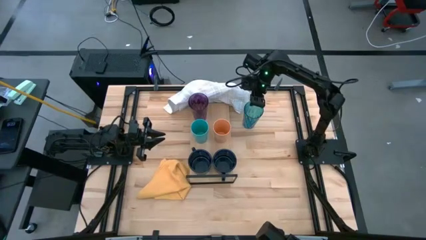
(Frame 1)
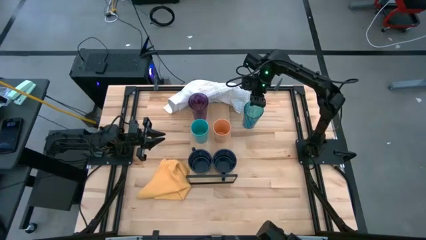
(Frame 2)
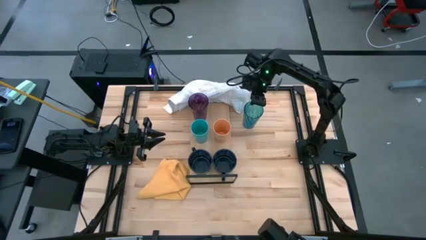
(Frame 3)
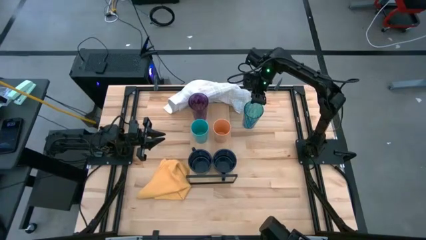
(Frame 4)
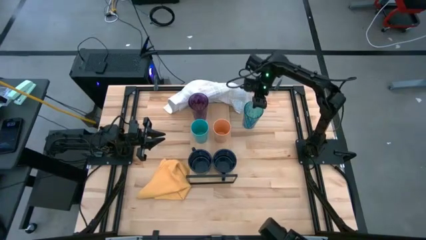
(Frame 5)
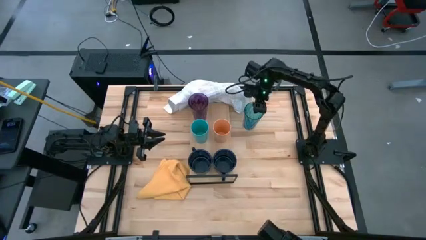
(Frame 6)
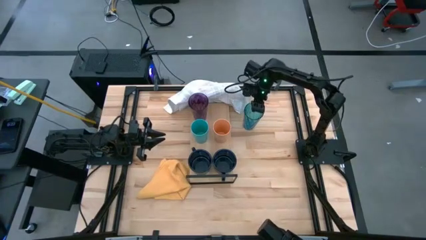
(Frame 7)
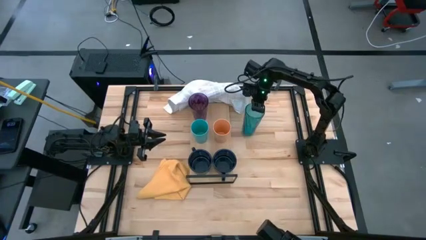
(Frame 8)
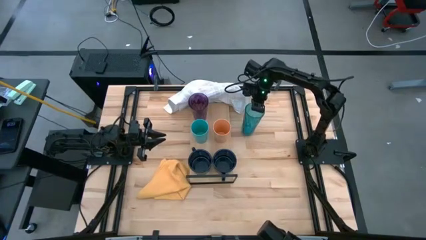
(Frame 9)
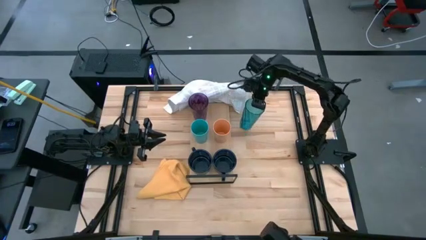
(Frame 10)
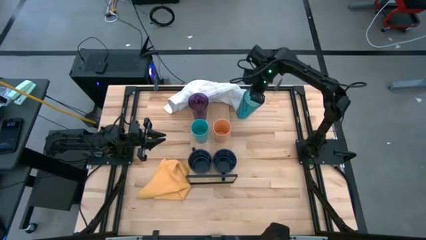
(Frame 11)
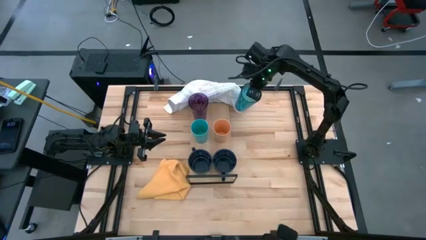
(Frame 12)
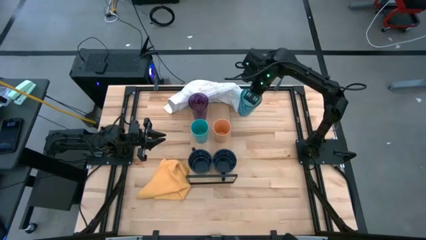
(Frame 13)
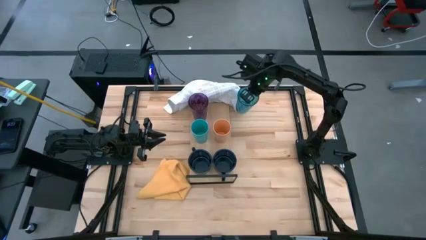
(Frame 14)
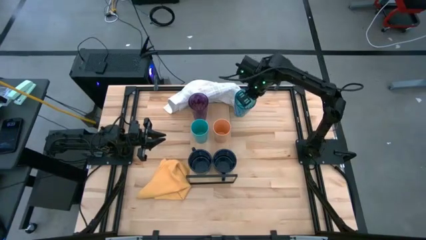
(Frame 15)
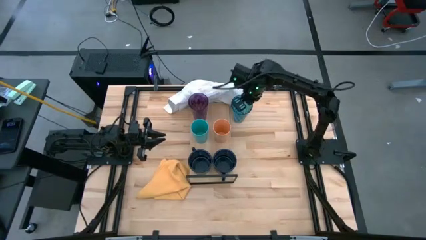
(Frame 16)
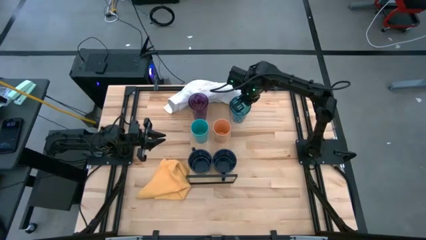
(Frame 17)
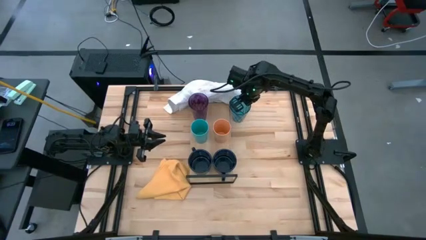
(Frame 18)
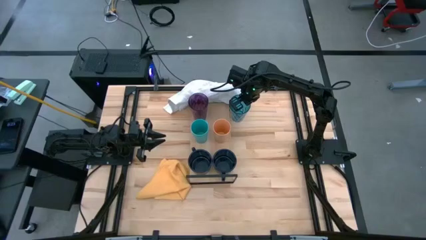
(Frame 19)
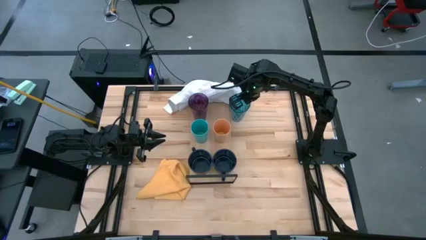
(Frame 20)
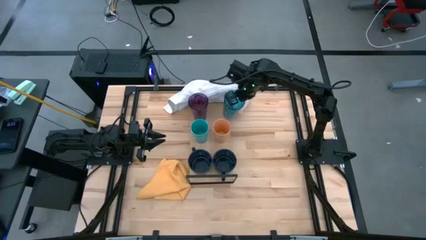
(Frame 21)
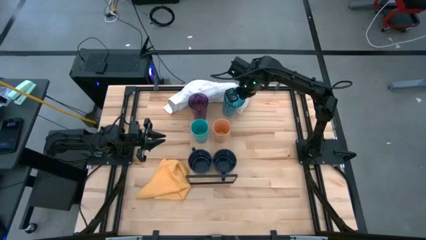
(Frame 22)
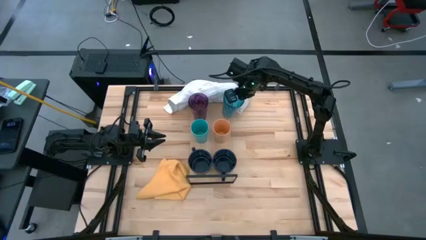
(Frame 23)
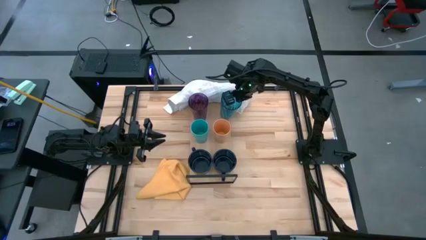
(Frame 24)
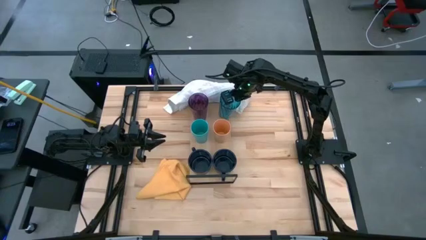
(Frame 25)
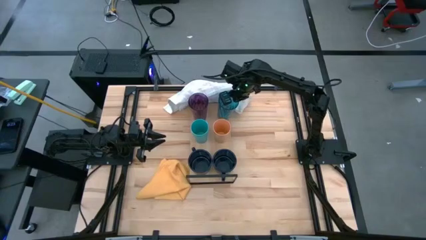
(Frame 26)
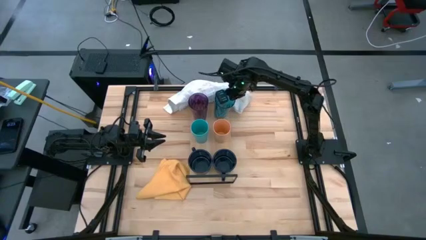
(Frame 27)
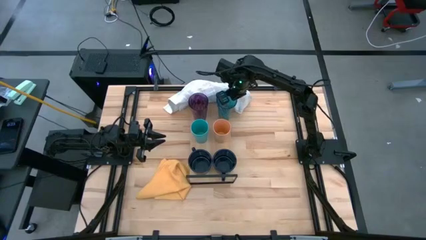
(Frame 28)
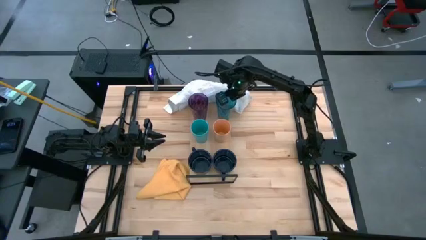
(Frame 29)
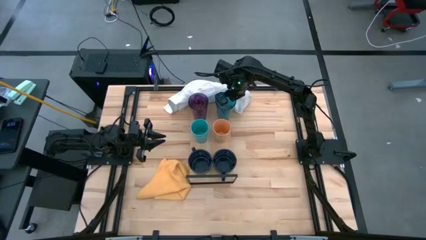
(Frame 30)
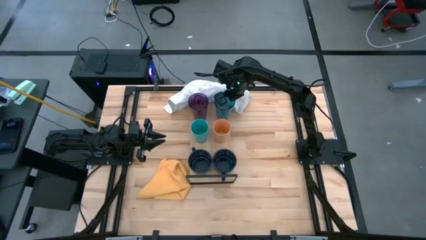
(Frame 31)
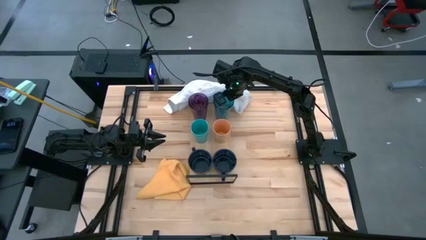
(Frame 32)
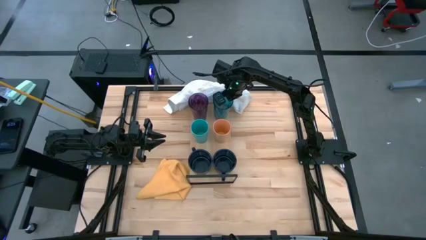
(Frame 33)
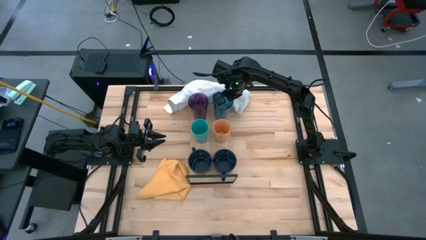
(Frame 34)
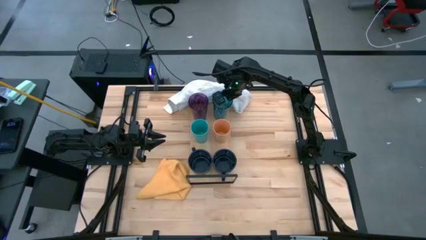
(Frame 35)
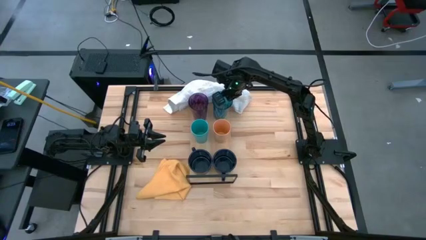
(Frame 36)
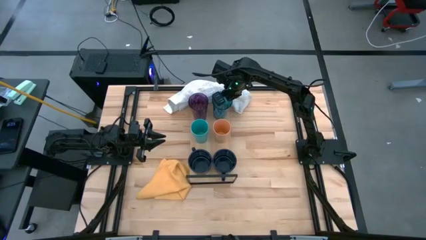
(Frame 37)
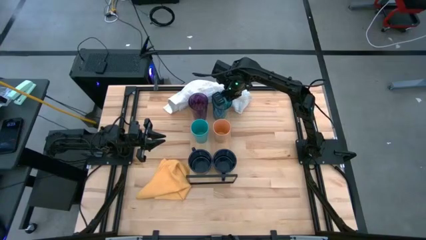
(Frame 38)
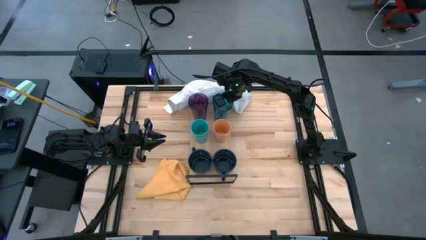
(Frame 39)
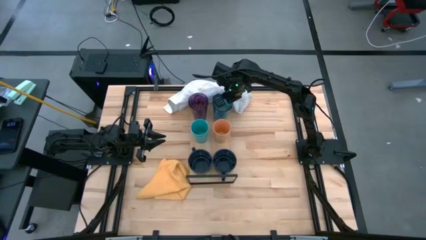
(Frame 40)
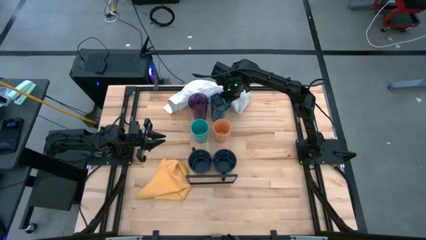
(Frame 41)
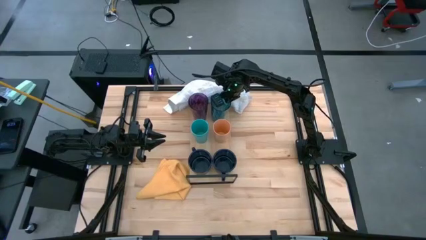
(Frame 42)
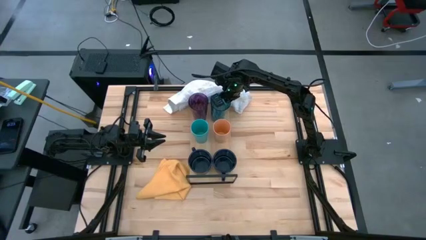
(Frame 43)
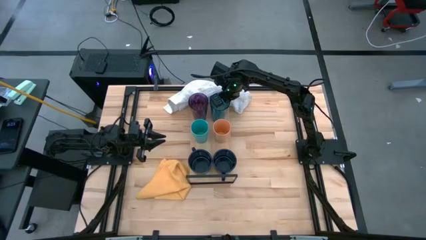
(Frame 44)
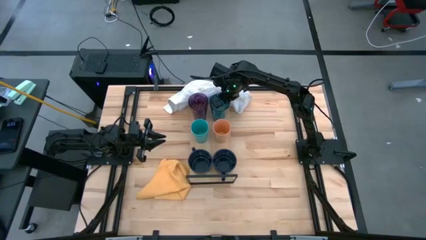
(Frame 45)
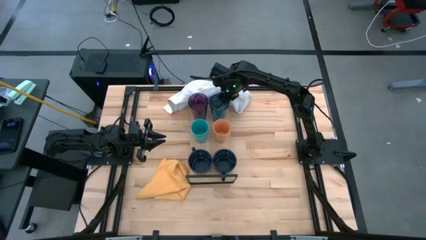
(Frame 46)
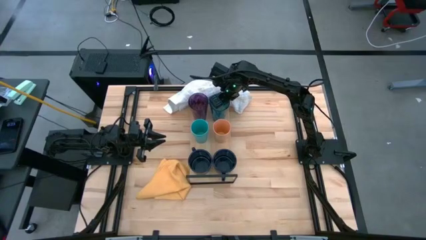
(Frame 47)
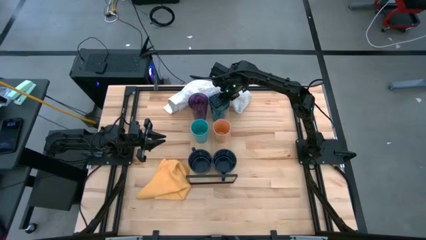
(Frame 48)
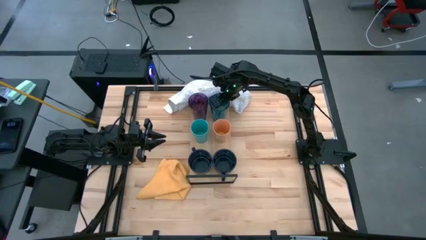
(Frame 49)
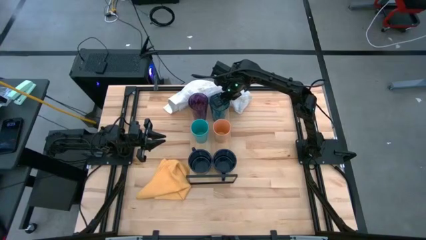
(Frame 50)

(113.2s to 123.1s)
Task: Stack small to large cups/mugs on shelf
Put the blue cup on the shelf

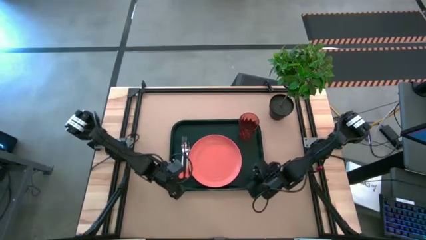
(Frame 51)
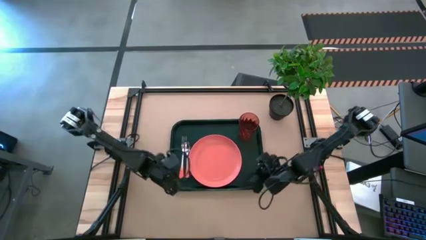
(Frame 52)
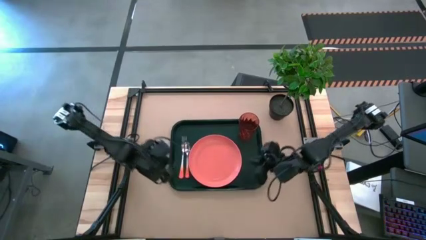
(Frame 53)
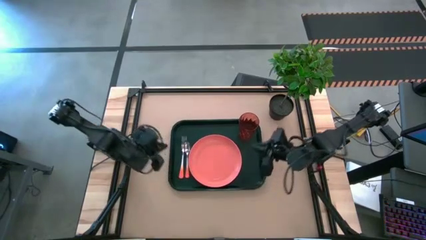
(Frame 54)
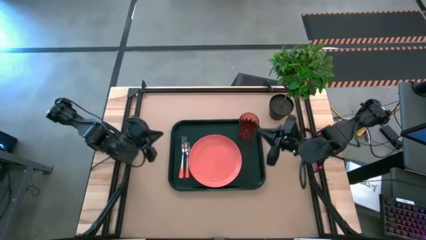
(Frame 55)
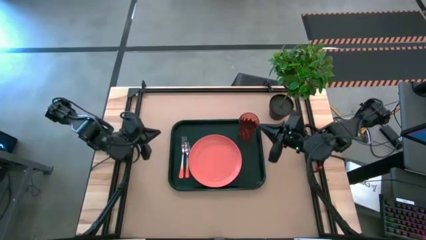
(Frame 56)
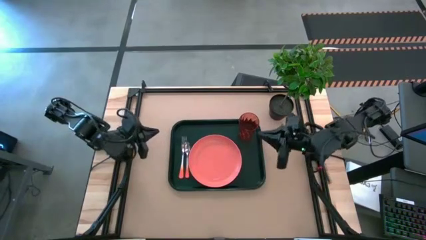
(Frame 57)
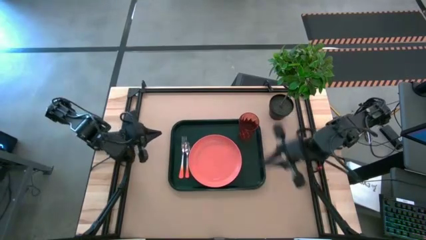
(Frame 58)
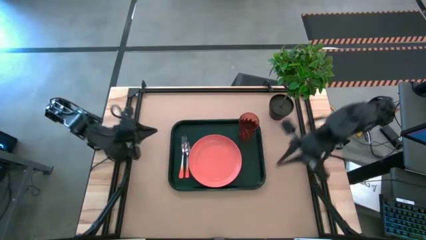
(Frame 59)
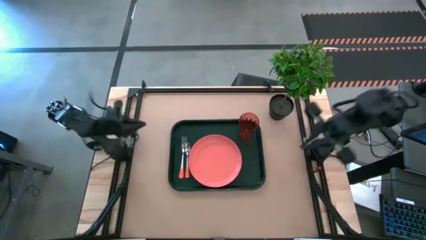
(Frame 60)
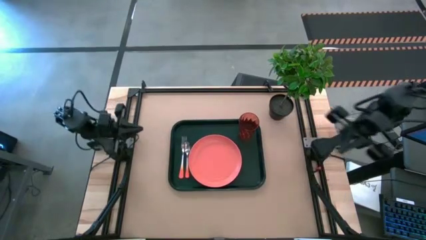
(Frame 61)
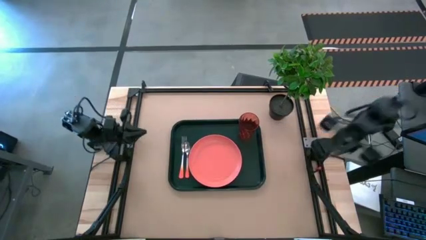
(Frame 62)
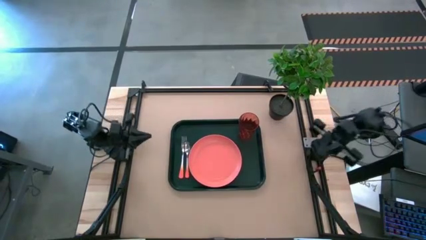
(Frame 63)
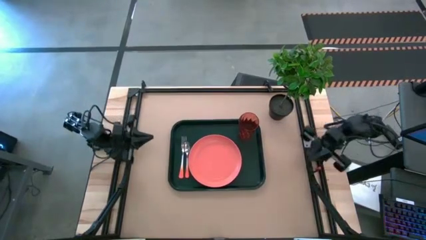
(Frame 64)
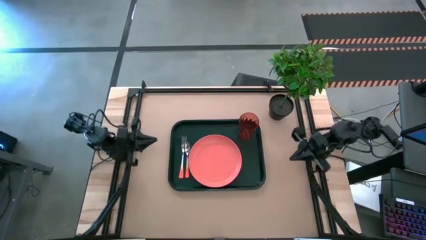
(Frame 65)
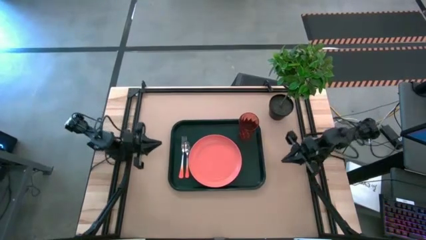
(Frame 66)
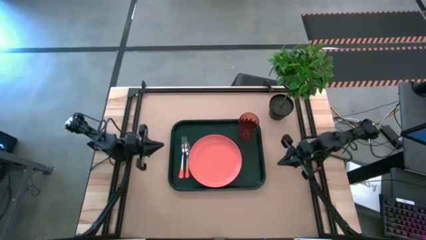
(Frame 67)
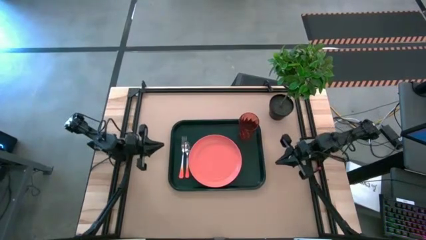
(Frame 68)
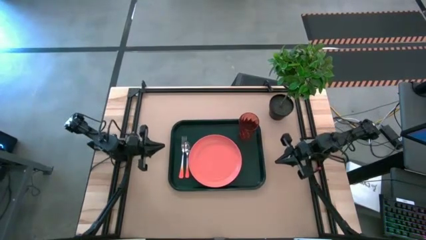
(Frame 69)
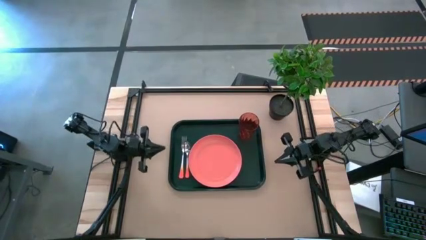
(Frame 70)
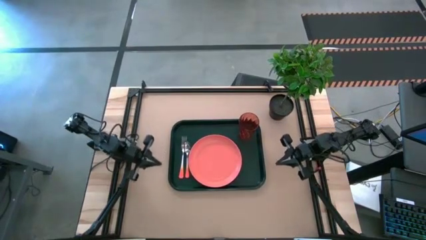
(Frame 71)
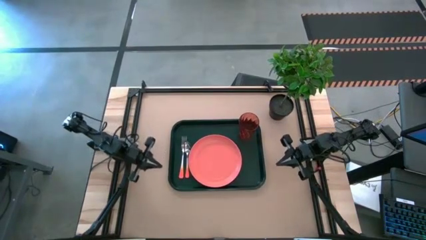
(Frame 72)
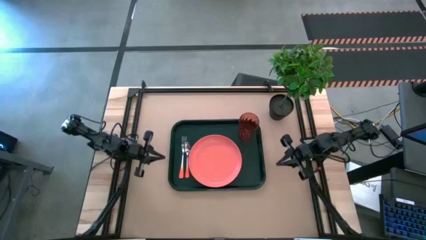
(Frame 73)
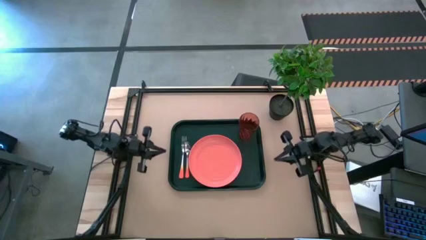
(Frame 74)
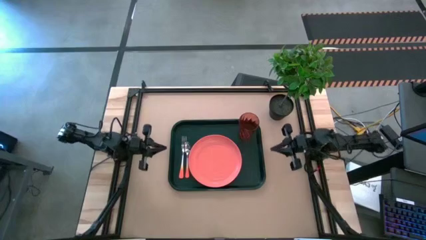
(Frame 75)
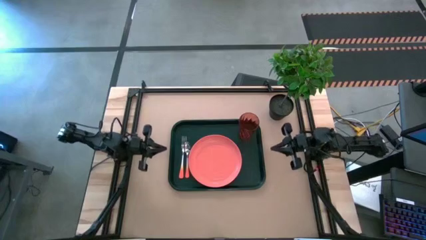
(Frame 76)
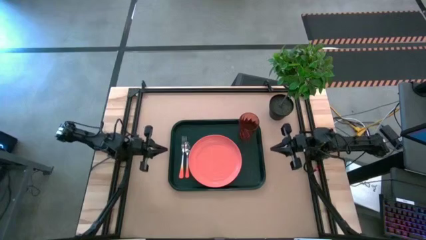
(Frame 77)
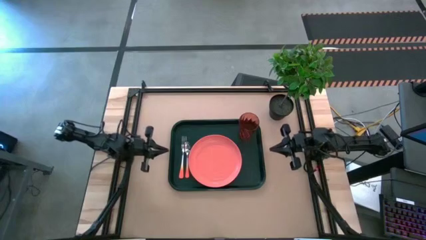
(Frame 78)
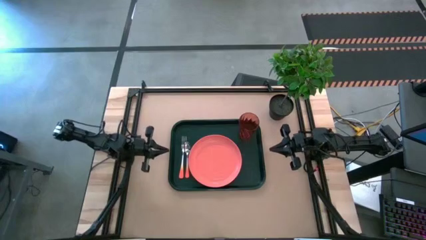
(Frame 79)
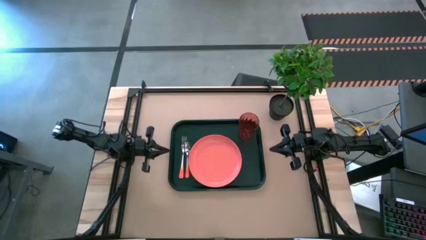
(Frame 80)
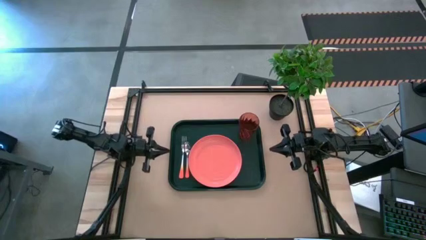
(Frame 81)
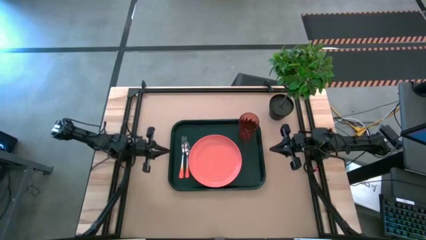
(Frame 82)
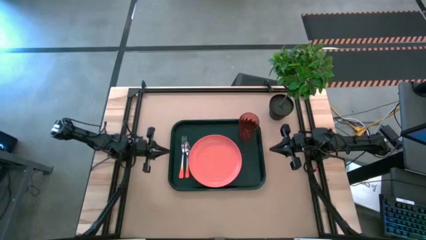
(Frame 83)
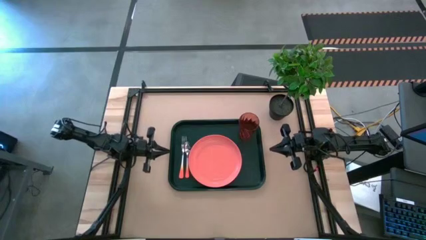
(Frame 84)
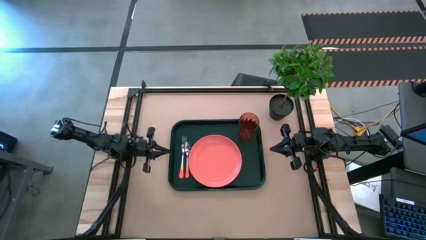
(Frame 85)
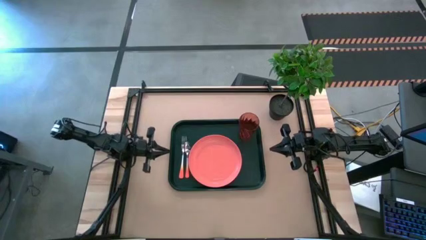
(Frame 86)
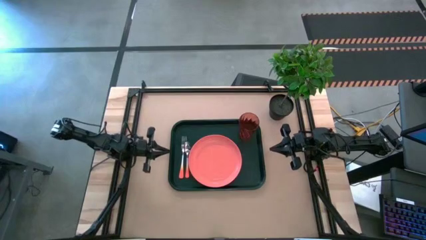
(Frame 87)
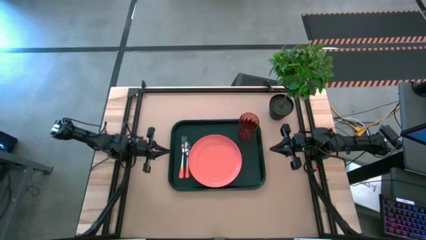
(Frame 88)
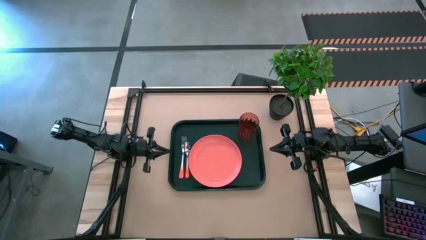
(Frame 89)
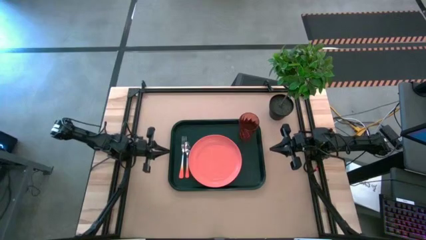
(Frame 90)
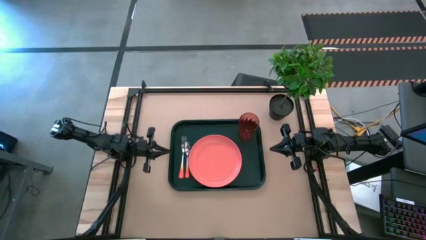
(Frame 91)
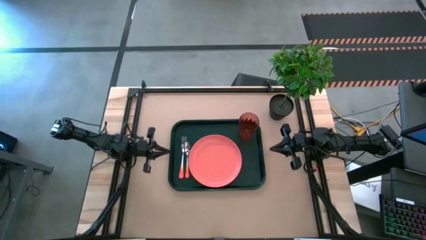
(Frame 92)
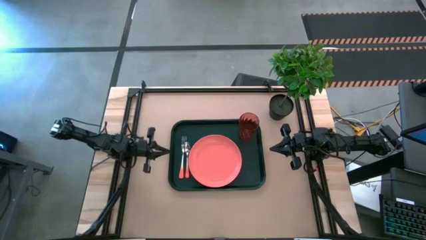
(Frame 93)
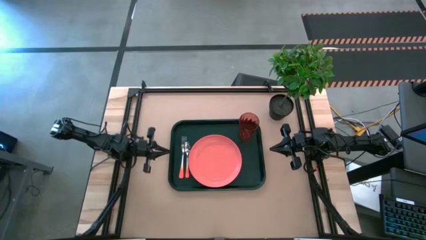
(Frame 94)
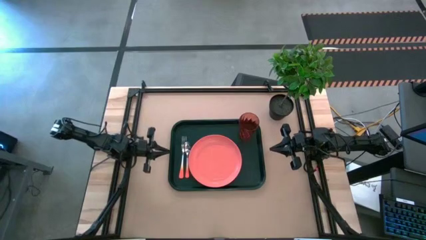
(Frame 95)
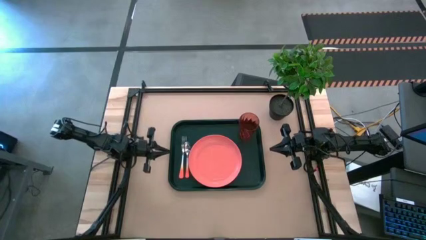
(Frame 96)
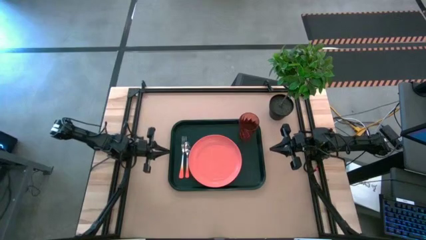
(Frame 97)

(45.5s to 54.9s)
Task: Pick and place plate/cup/fork/spoon on tray
Return to Home Position
